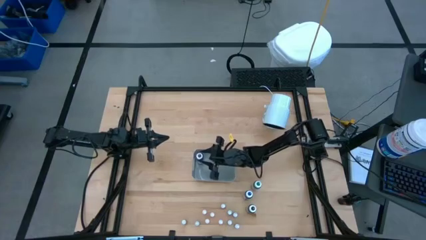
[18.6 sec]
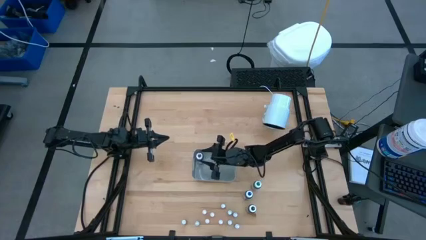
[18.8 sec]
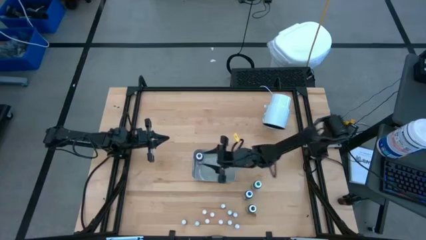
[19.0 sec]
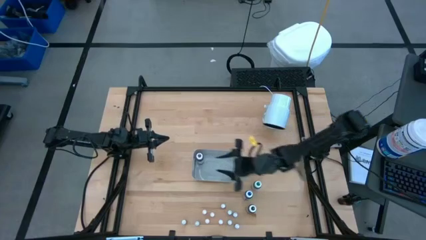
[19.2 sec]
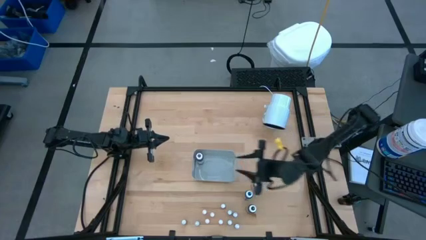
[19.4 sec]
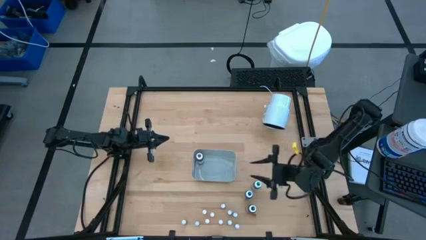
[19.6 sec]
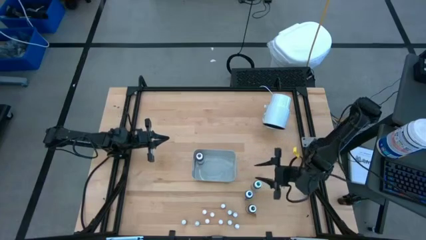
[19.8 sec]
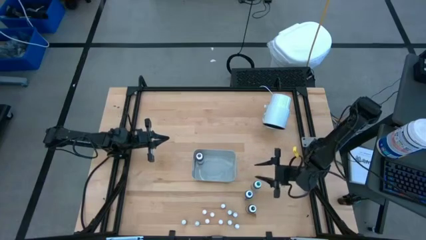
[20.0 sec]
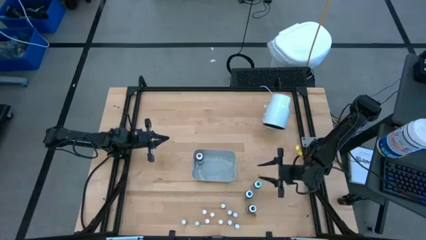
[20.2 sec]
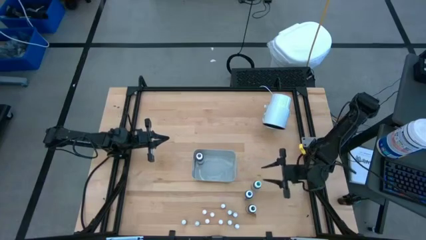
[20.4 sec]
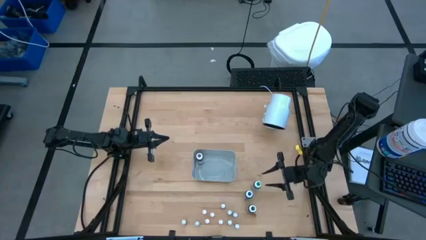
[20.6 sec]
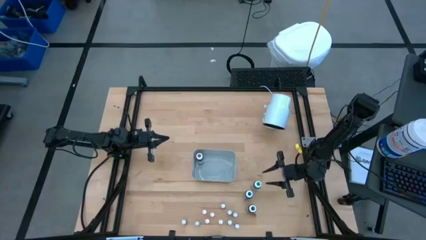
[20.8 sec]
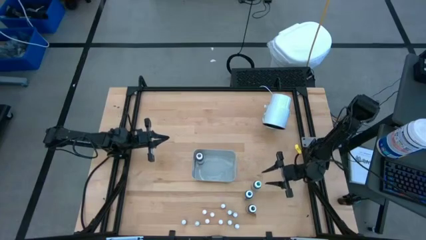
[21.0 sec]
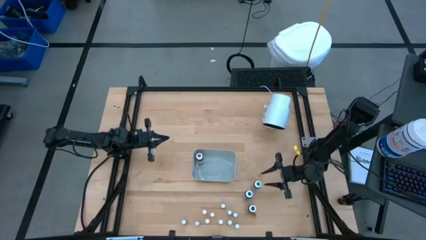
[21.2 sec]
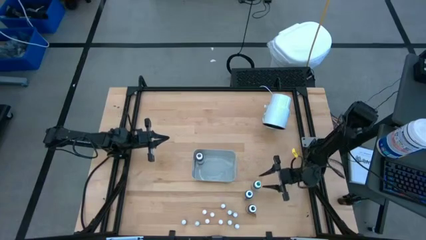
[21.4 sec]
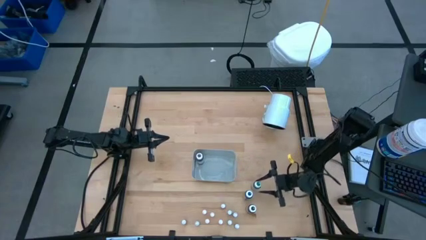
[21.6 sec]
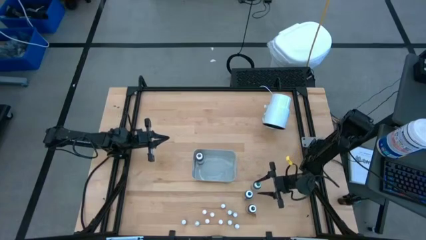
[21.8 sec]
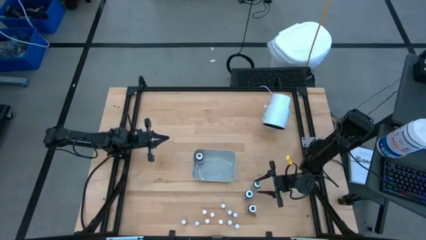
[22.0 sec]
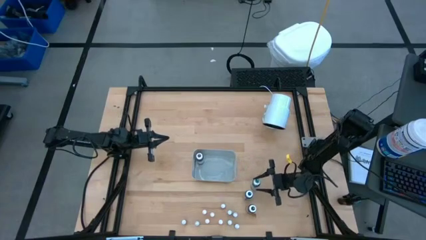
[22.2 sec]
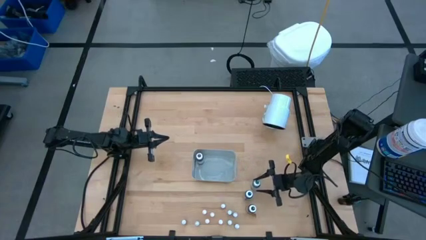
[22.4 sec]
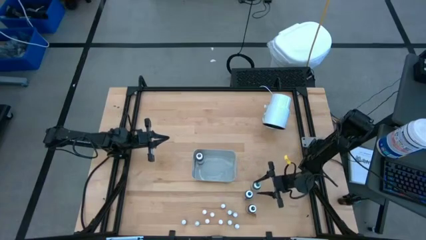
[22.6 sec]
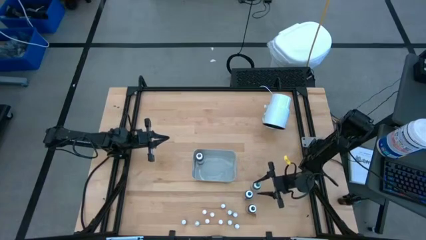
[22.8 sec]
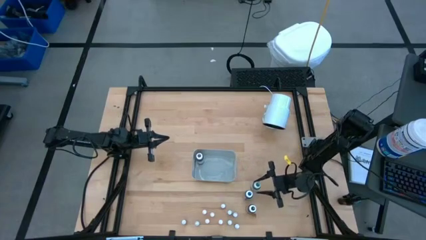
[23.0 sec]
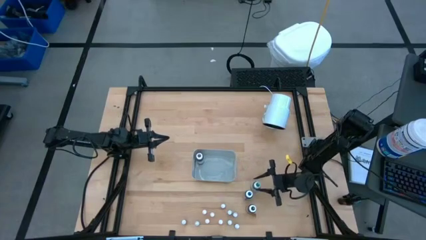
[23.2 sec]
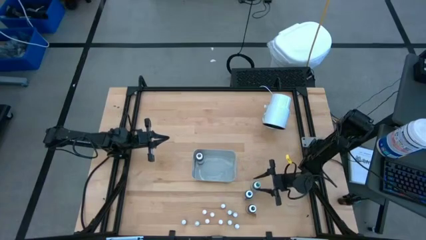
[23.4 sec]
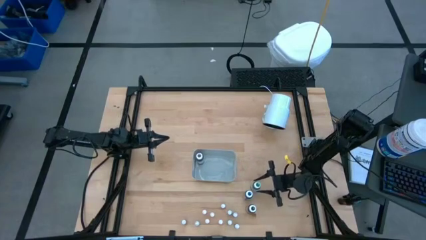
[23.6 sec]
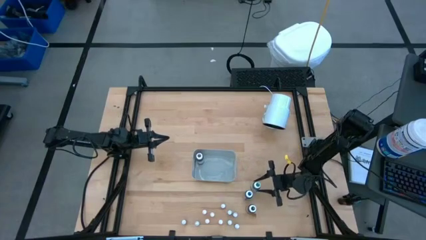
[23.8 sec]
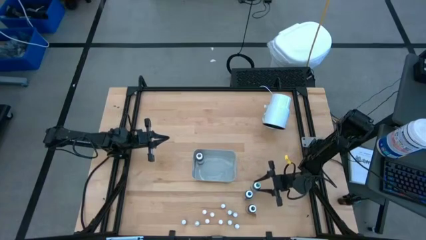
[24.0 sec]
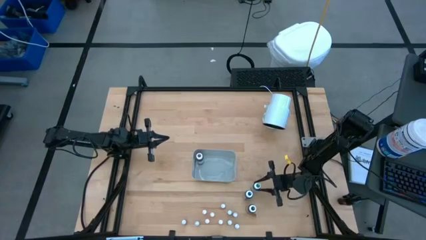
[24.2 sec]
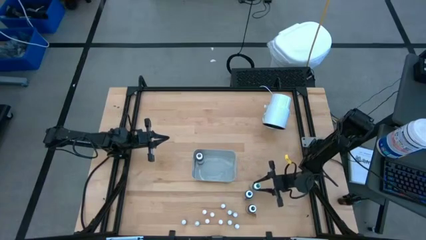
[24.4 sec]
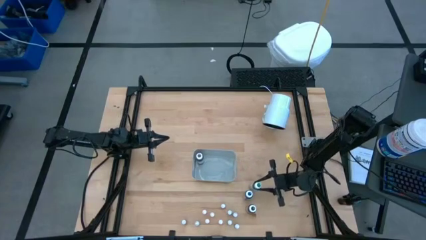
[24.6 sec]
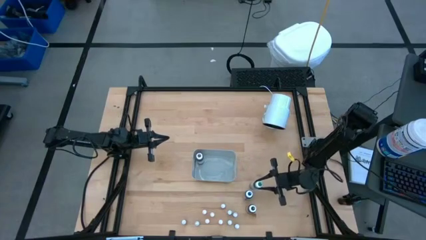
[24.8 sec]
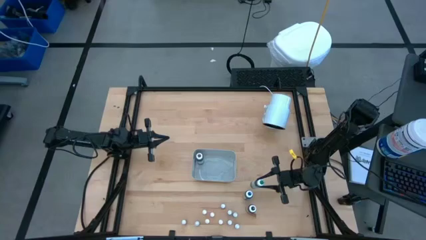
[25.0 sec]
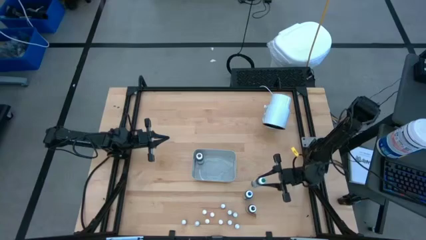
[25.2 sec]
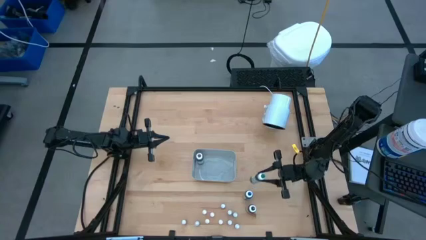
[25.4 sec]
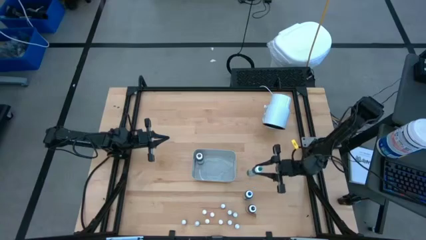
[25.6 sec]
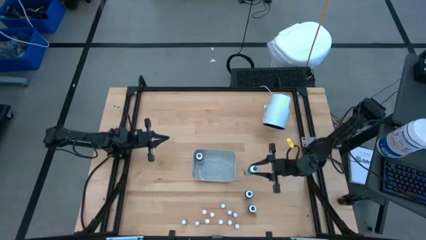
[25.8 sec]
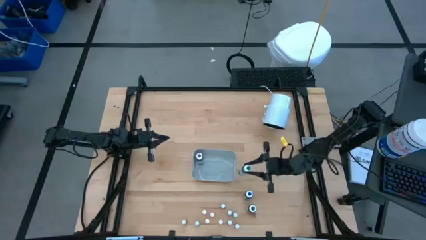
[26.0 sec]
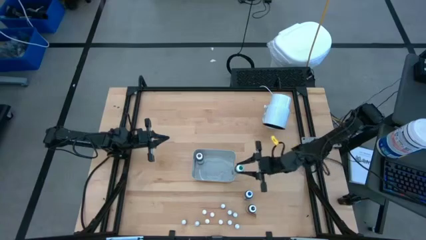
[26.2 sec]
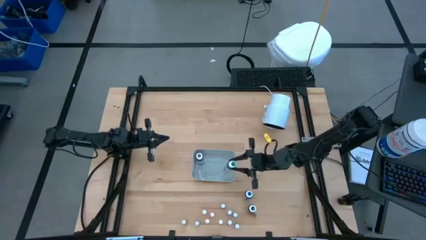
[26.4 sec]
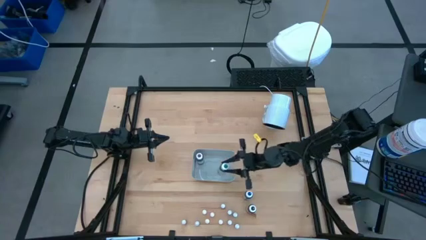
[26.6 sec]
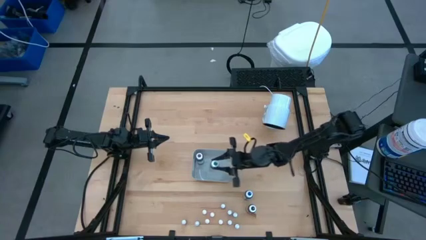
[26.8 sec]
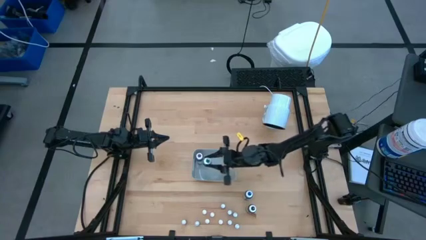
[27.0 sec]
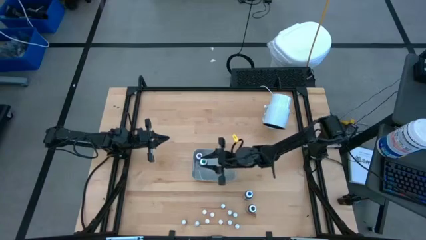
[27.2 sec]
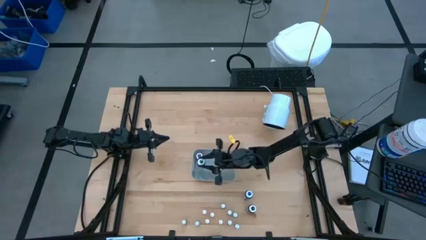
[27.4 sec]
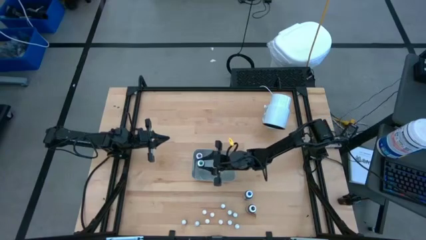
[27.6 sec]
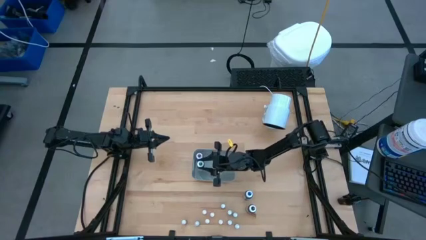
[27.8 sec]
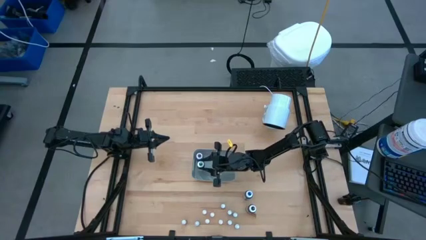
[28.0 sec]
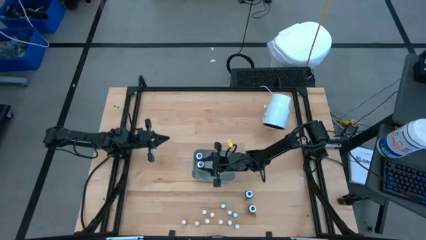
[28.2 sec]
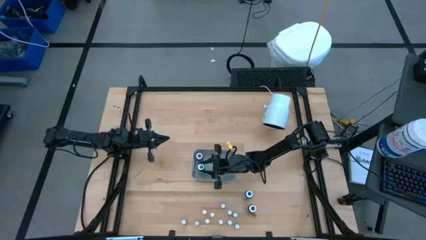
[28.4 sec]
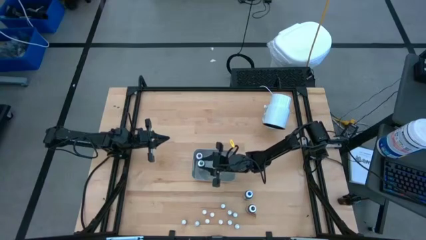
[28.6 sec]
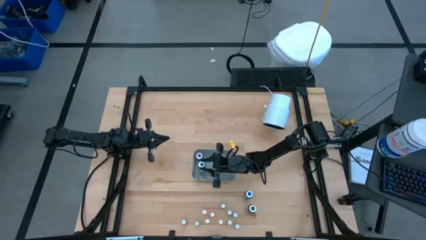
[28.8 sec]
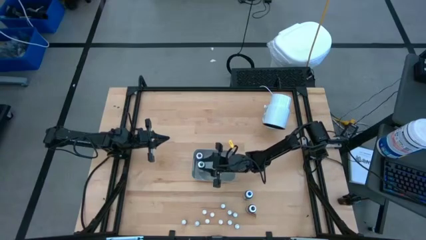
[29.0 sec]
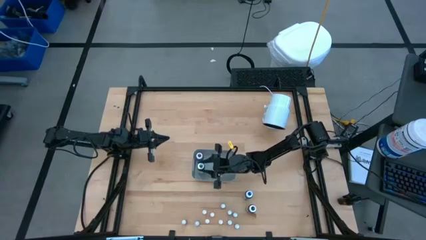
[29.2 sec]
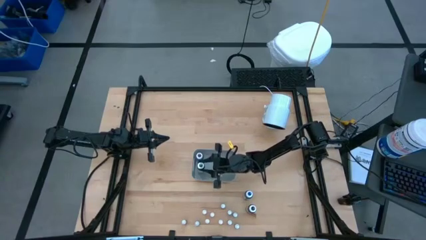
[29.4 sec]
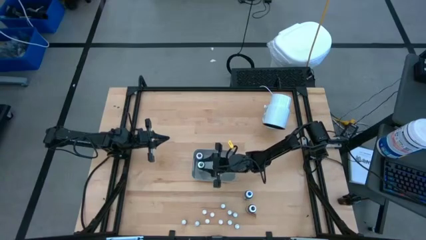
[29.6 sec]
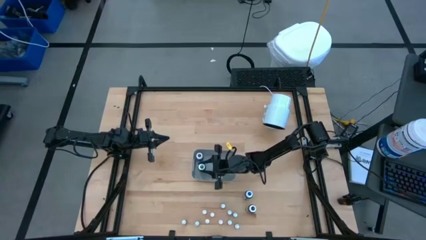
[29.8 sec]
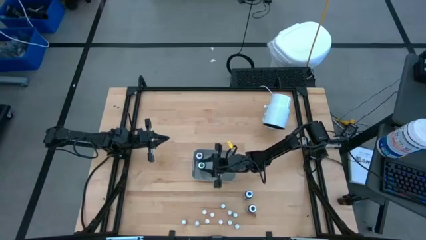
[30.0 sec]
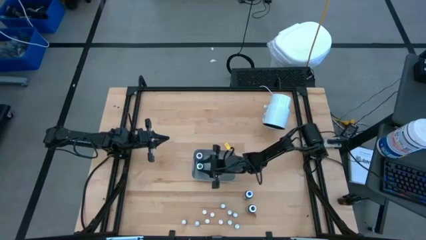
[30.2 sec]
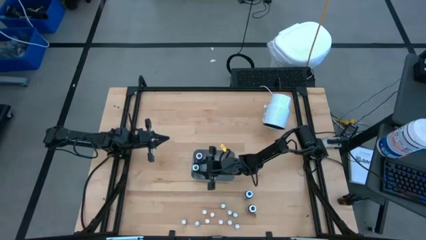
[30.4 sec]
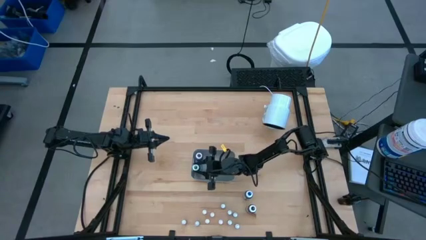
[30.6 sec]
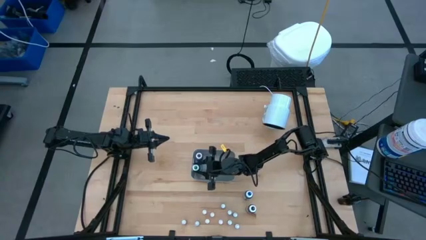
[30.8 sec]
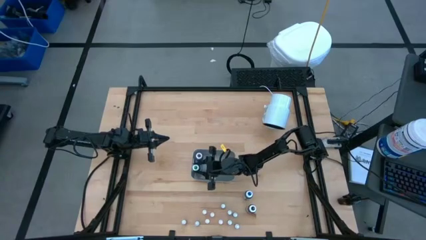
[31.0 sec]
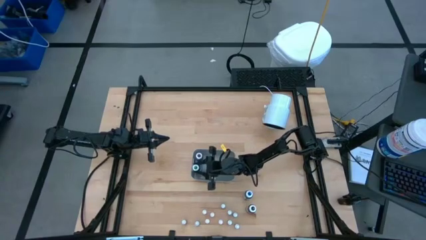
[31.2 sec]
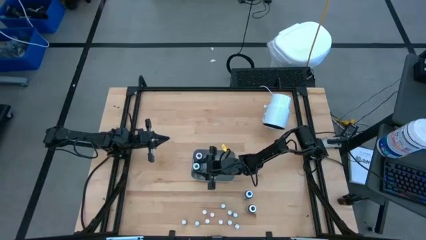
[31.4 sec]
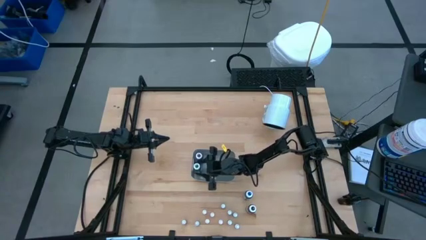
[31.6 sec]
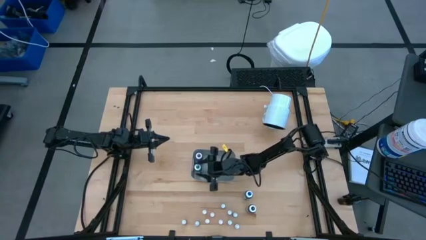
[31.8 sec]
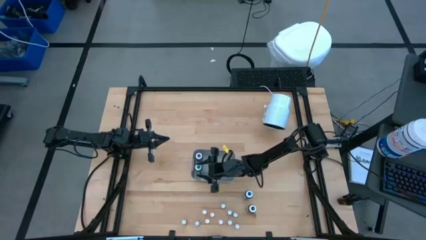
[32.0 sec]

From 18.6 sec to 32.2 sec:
Task: Pick & Place food coloring
Put the big green food coloring bottle into the gray bin

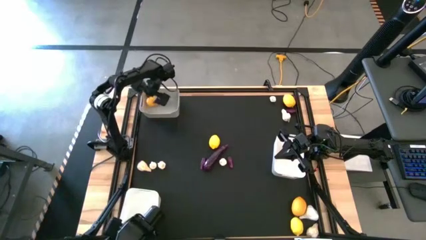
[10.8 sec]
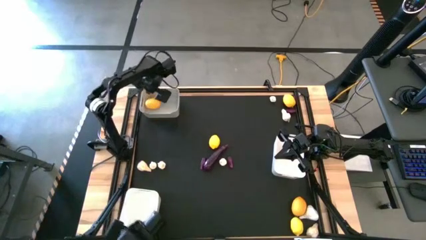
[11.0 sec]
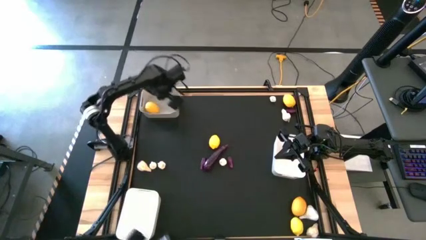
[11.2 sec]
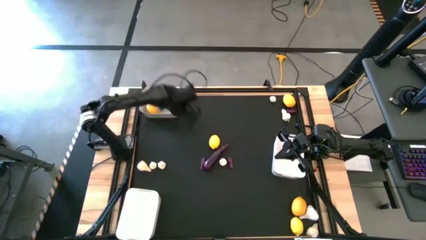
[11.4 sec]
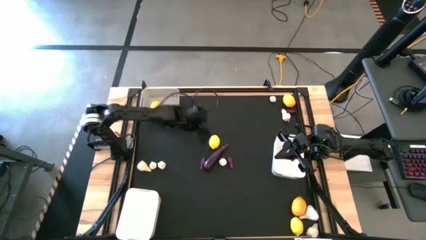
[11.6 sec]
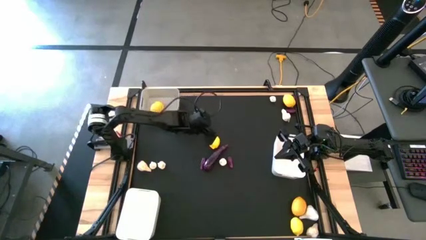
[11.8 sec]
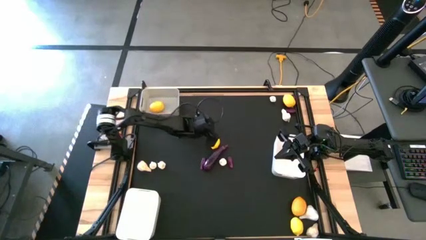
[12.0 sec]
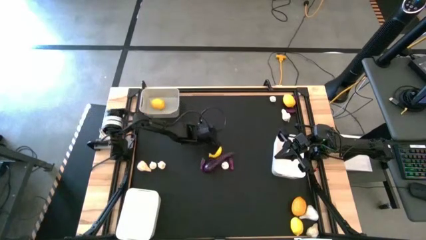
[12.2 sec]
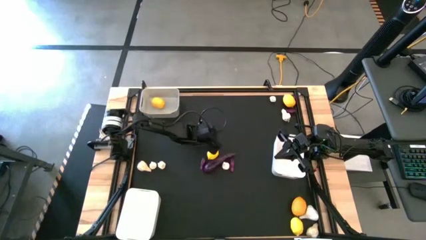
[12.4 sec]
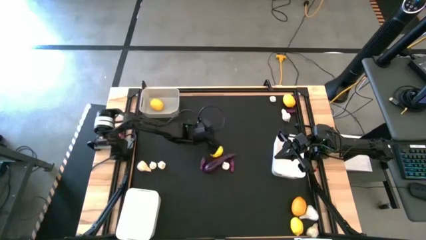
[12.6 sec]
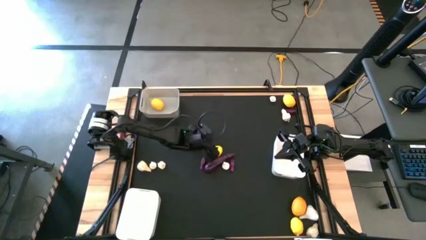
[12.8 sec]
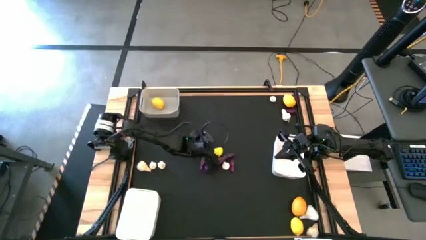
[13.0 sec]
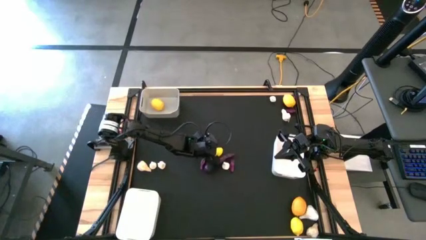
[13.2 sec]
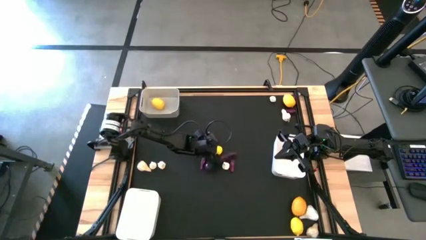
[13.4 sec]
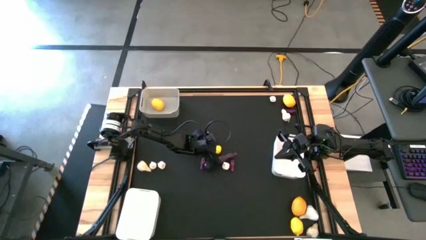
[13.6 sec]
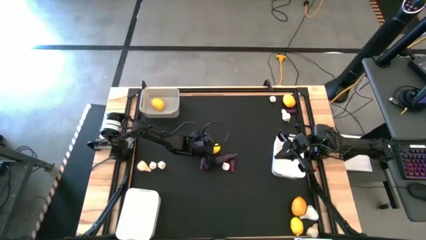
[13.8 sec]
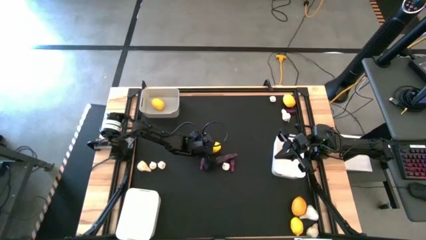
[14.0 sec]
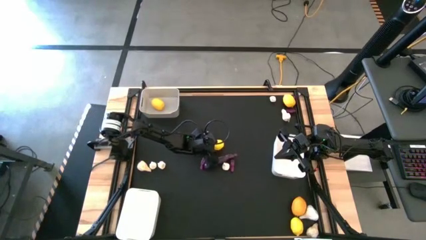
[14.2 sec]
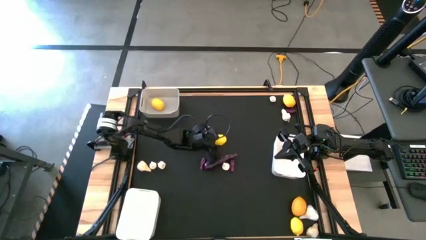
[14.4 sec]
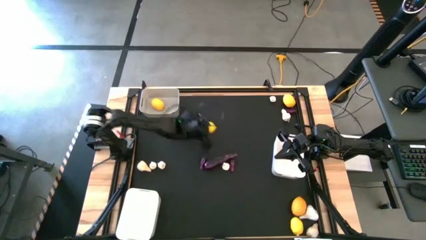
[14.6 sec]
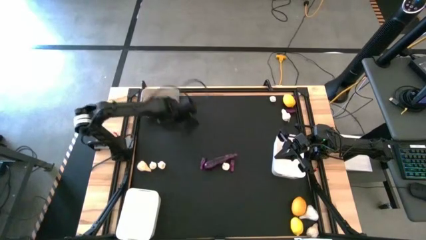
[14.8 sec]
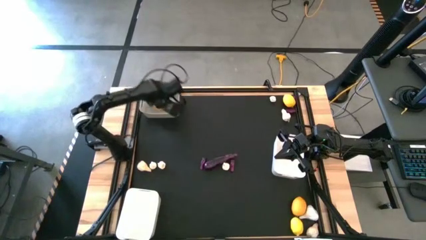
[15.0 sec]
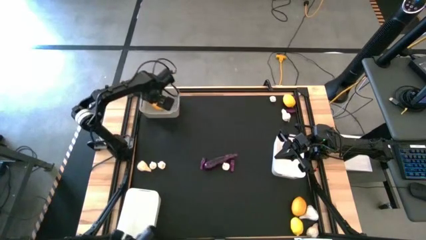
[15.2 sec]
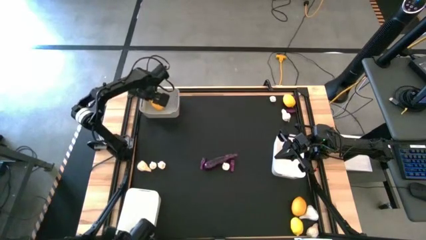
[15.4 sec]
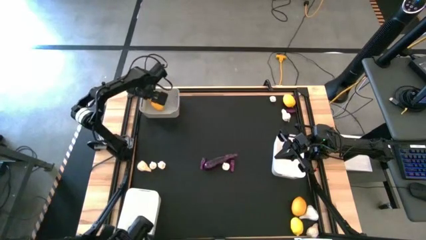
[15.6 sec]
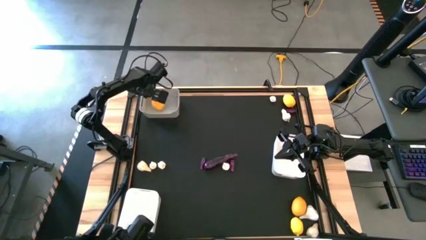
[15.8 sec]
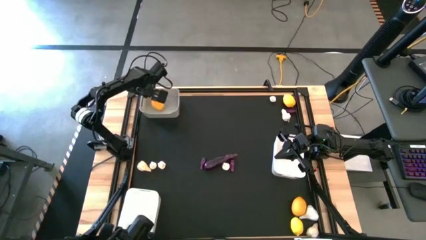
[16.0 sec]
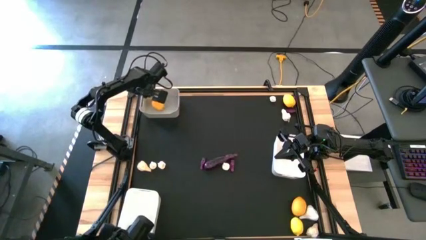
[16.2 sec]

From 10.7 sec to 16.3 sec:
Task: Sort produce into baskets
Put the top left lemon into the top white bin
